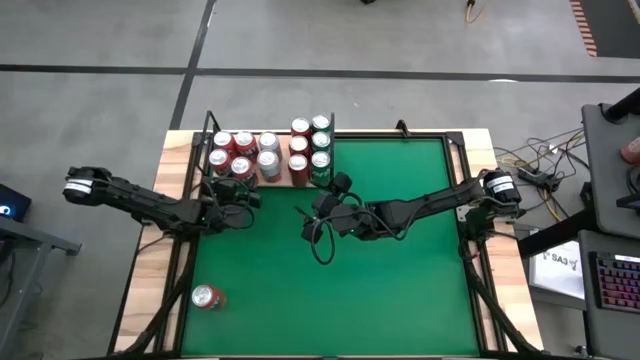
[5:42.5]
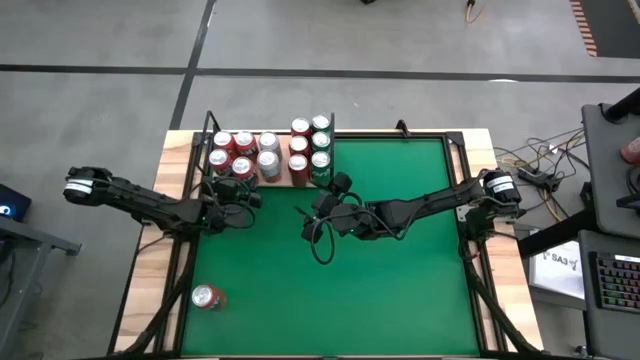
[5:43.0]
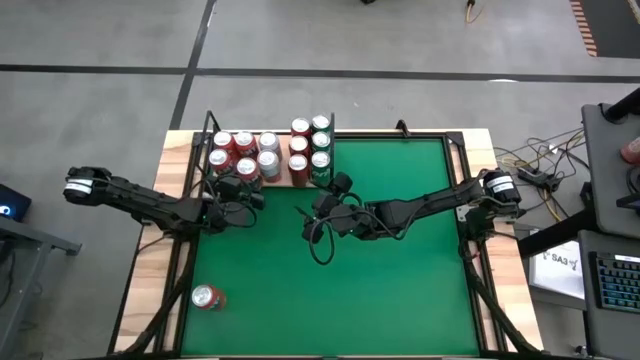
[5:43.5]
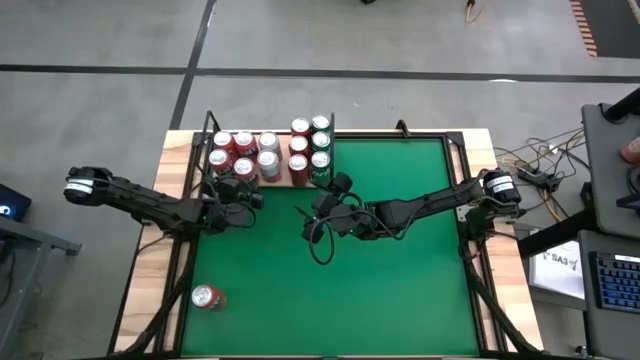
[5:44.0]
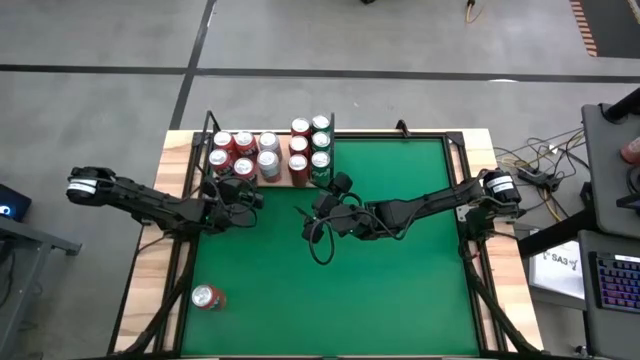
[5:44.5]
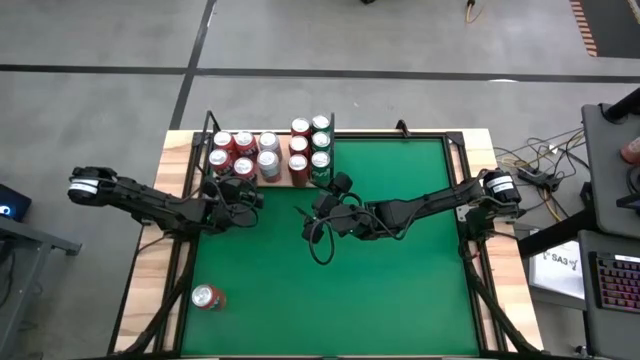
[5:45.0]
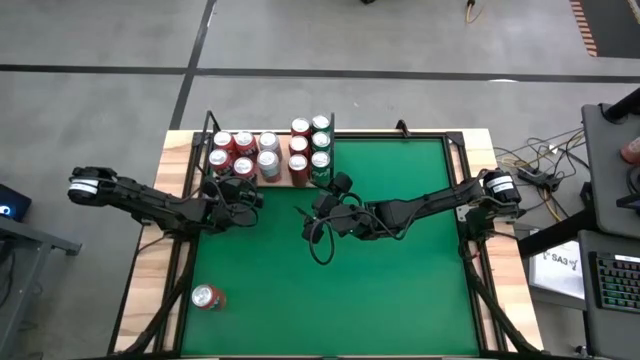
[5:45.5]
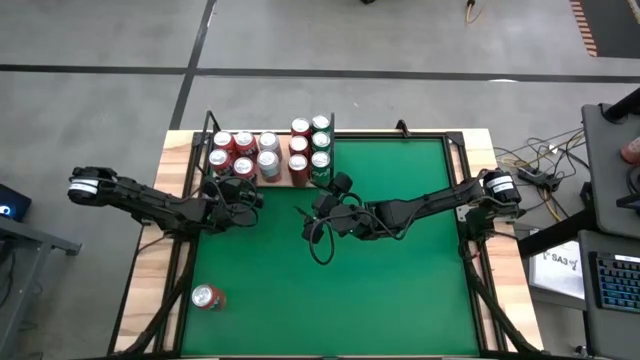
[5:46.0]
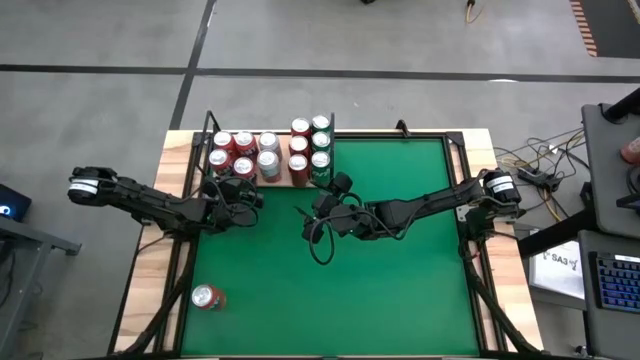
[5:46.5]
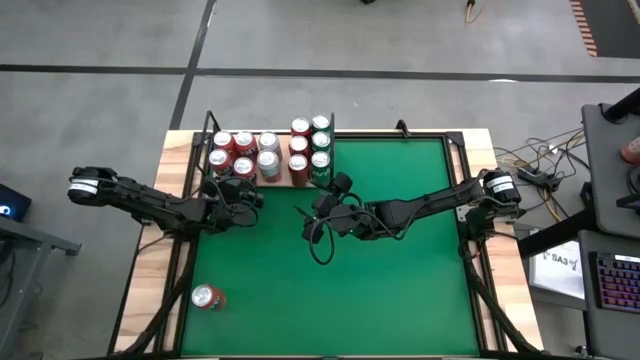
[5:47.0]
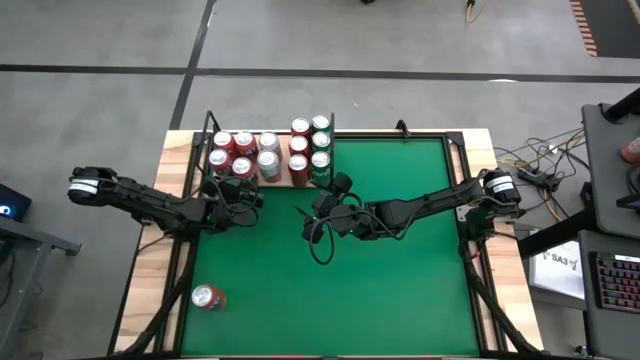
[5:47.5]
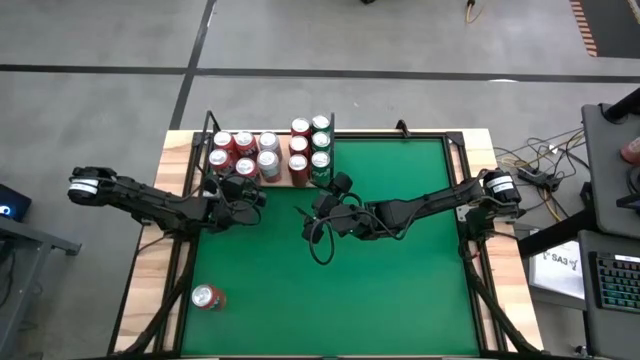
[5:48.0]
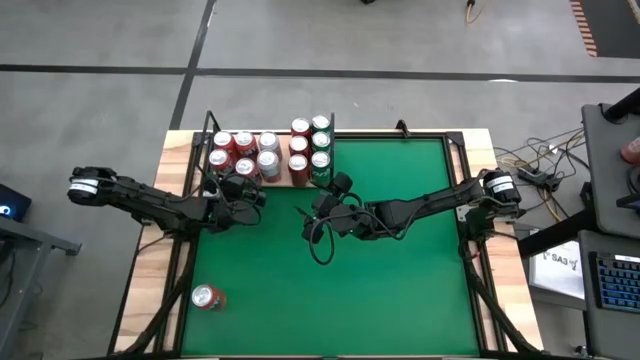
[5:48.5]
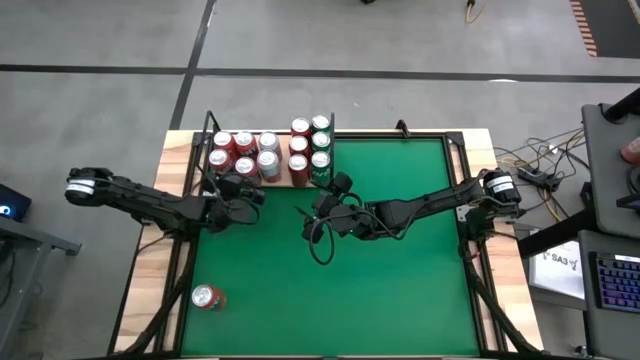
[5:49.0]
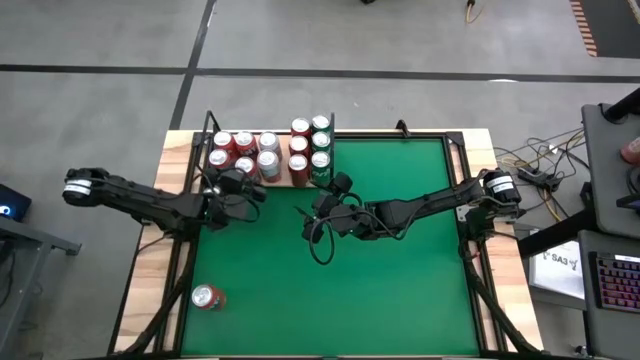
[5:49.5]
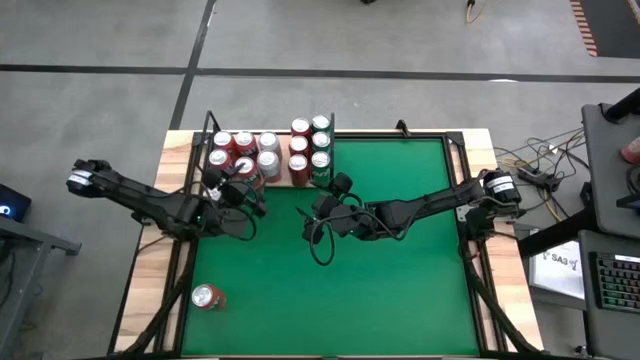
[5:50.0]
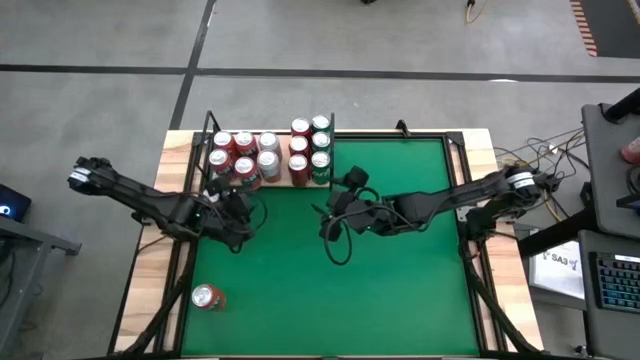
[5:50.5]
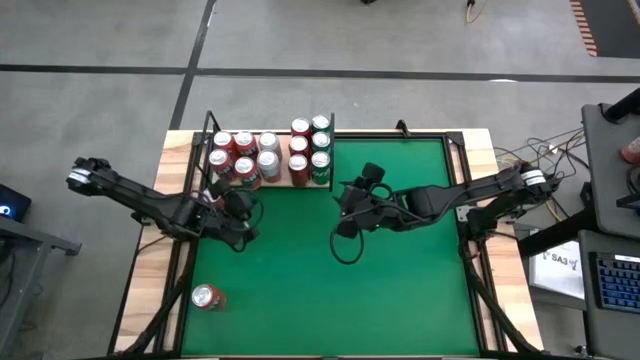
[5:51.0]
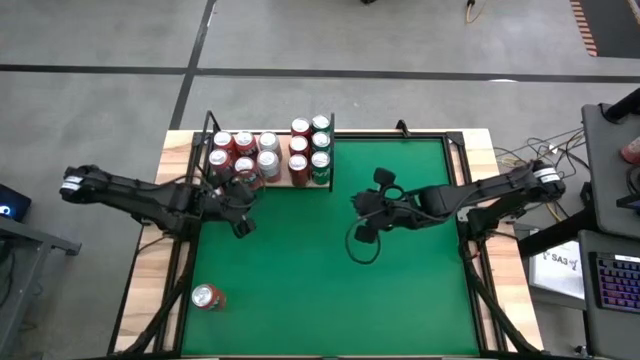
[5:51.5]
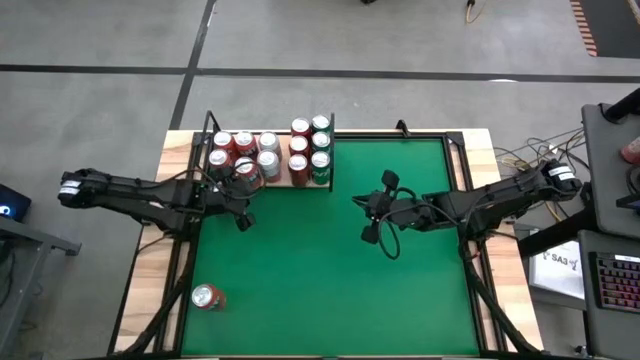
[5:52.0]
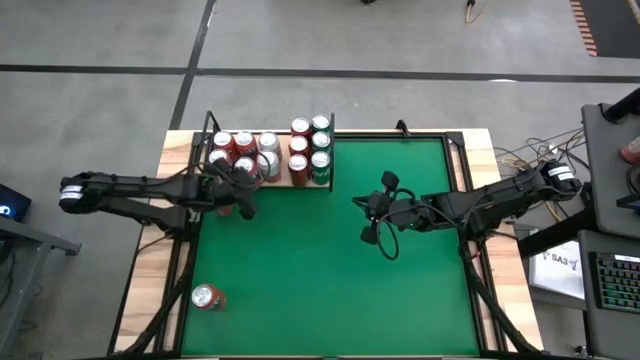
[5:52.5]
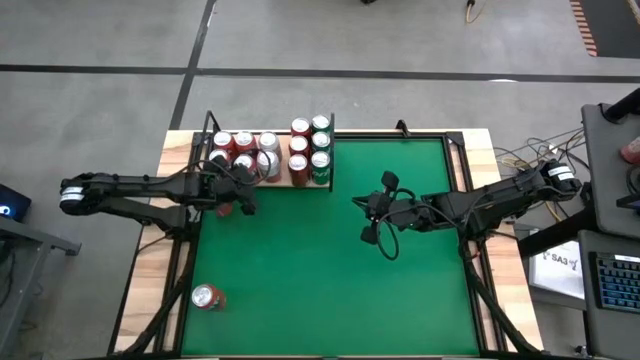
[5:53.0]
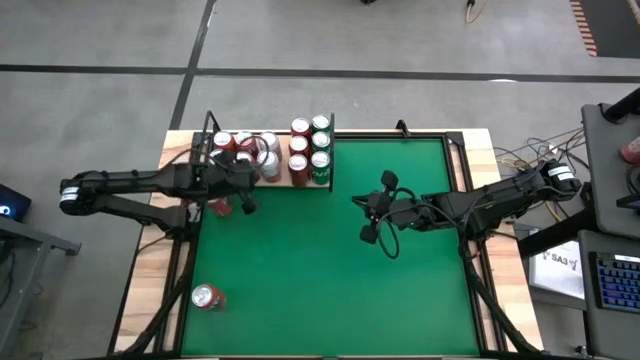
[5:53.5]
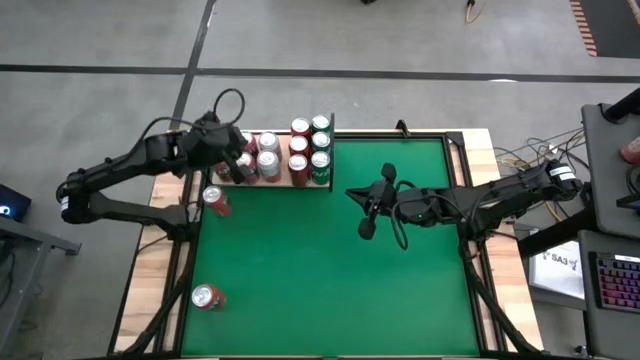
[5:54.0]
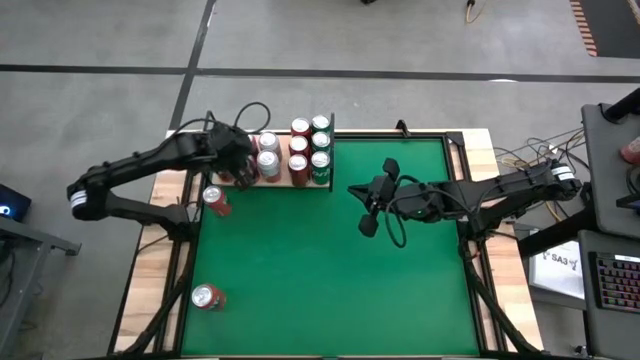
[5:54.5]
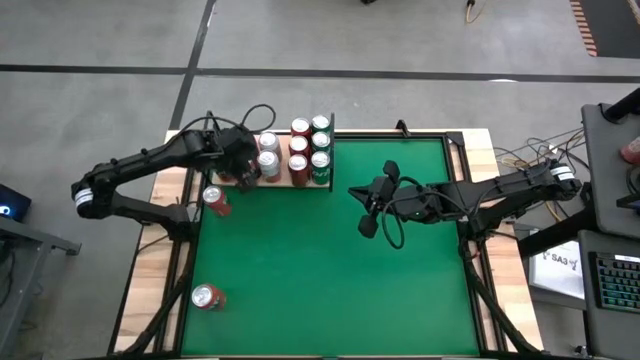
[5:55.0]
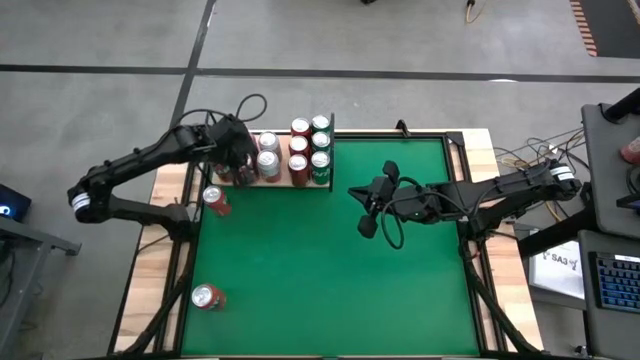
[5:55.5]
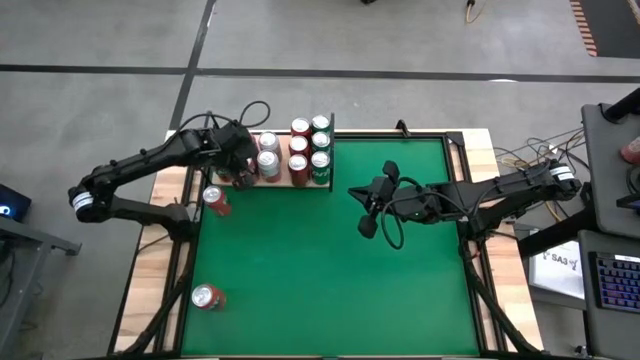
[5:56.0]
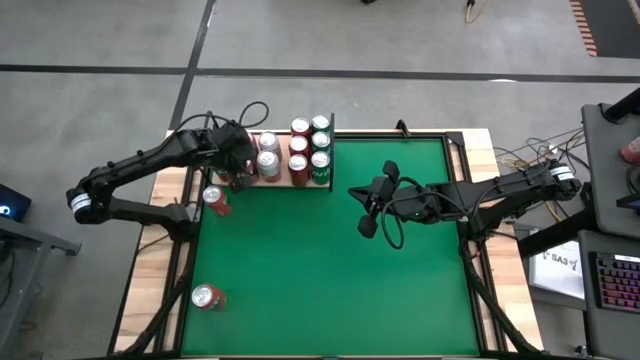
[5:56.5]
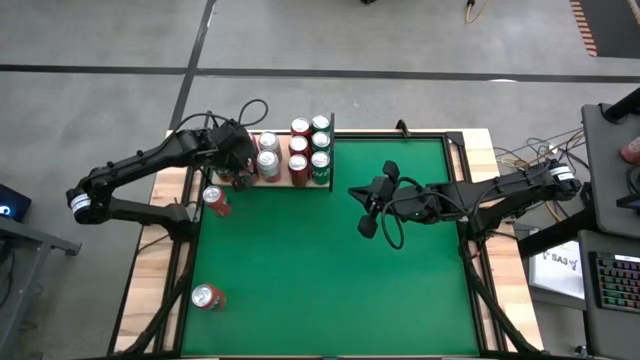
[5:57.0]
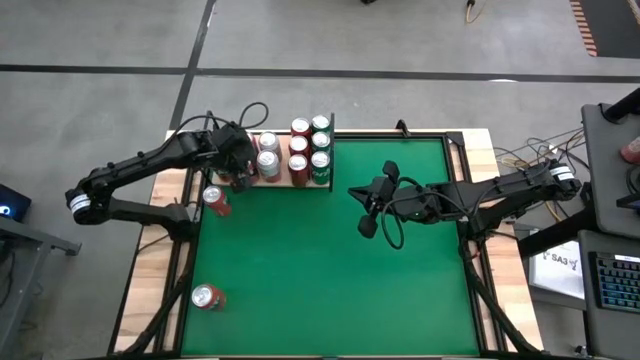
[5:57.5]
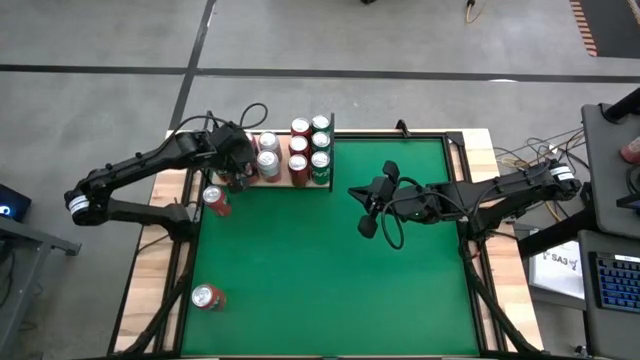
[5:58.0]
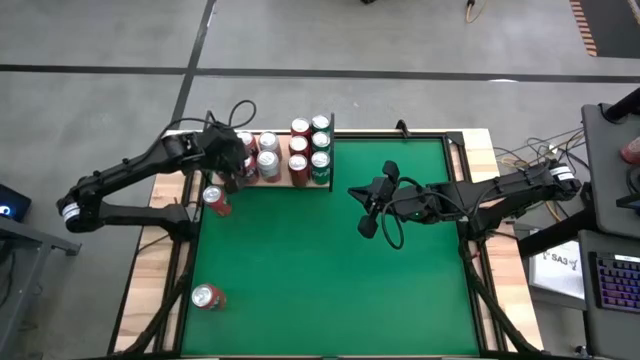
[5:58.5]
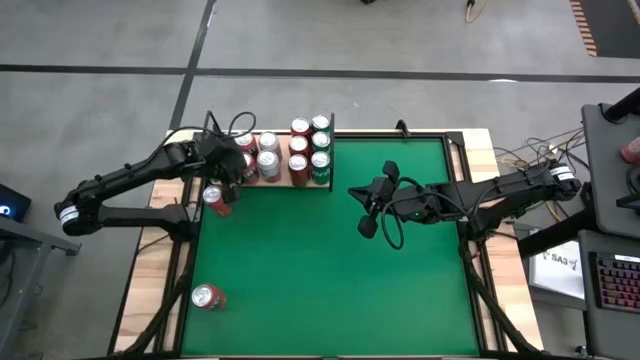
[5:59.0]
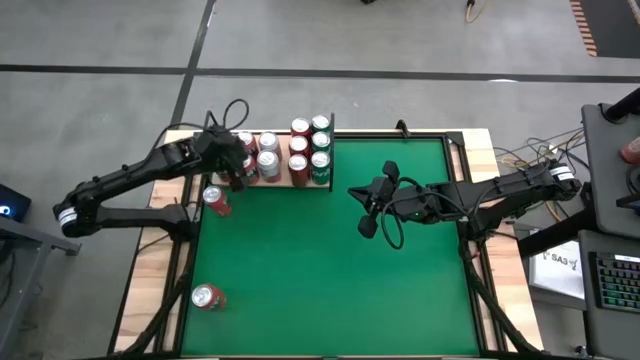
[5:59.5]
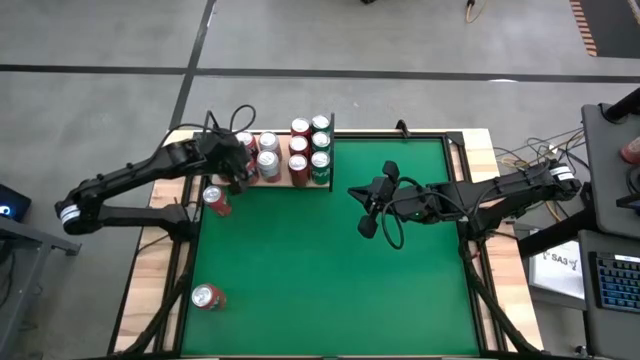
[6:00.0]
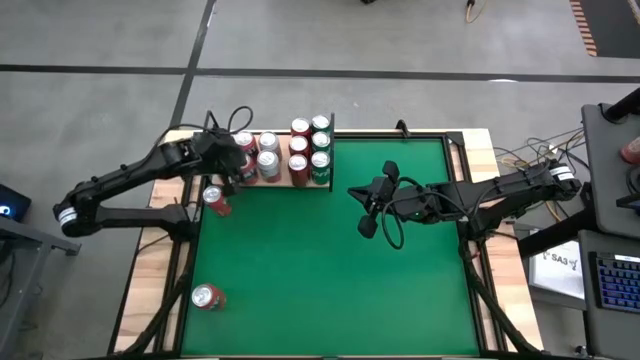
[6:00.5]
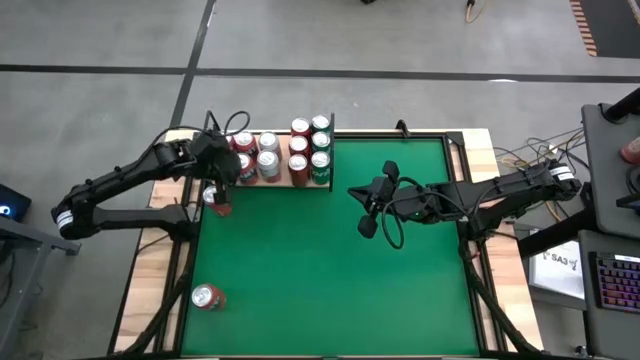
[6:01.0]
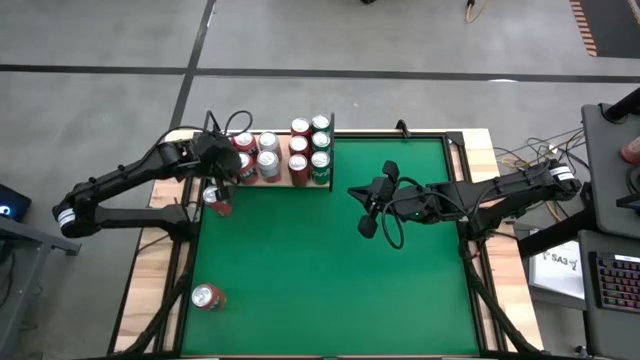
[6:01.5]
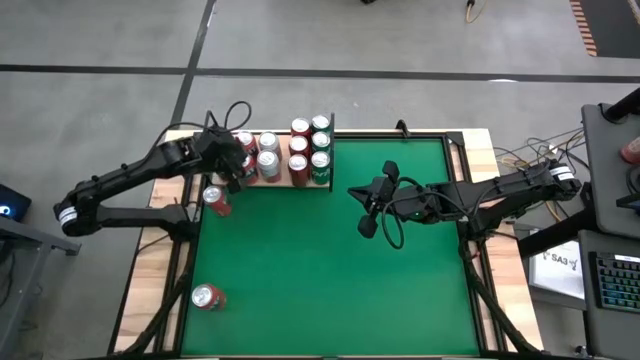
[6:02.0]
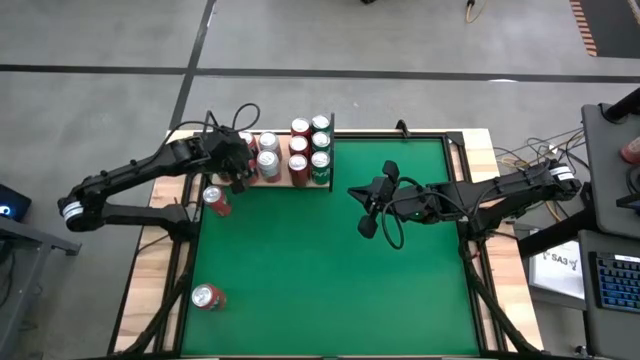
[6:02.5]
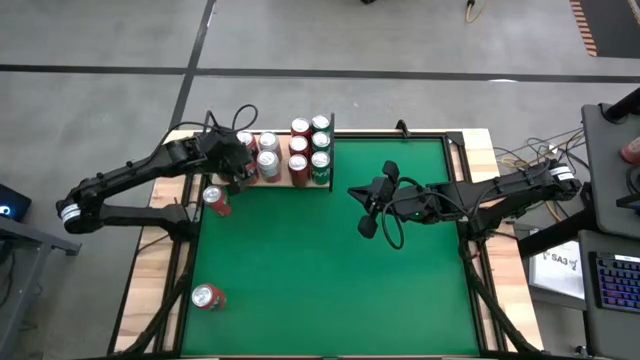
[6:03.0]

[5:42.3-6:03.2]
Task: Place canned beverage on shelf
Put the red soda can on the shelf aligned with the other red soda can
